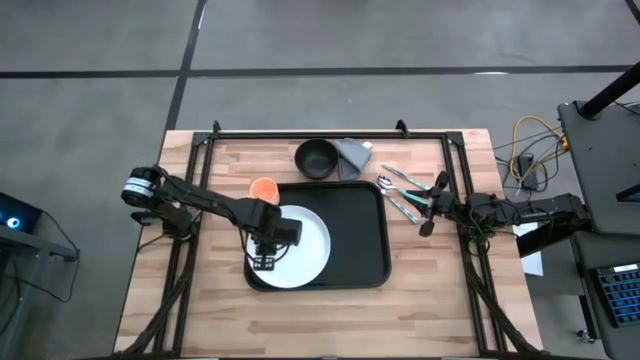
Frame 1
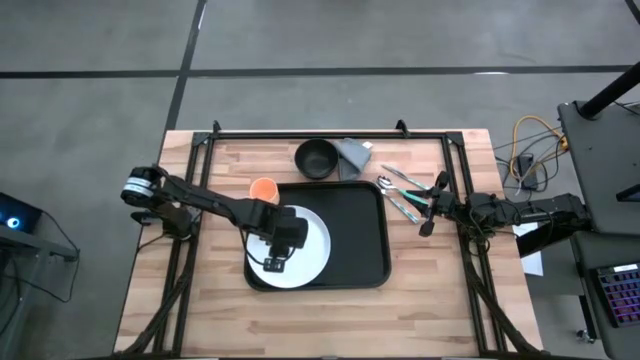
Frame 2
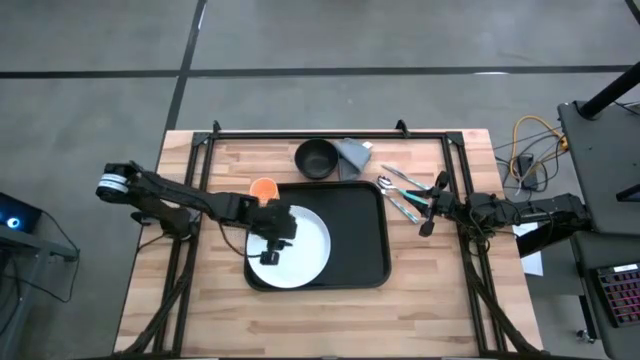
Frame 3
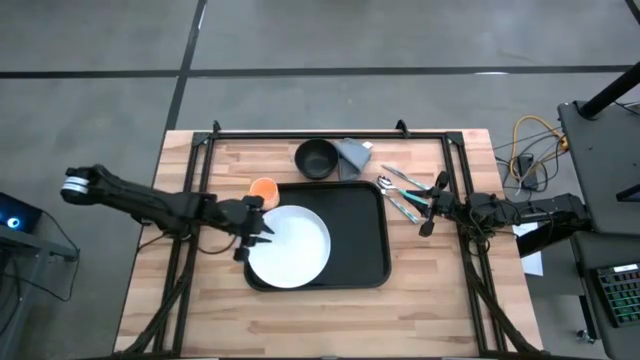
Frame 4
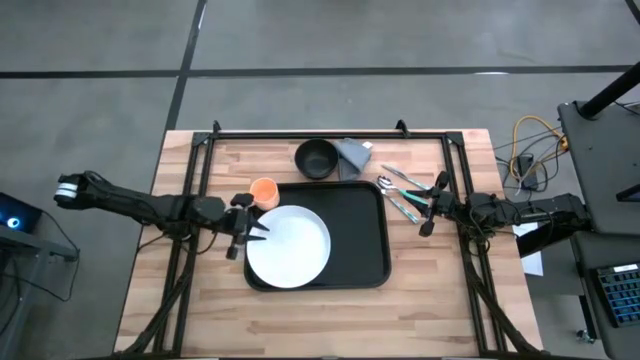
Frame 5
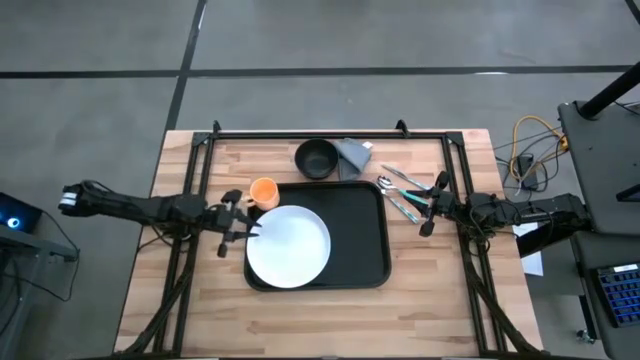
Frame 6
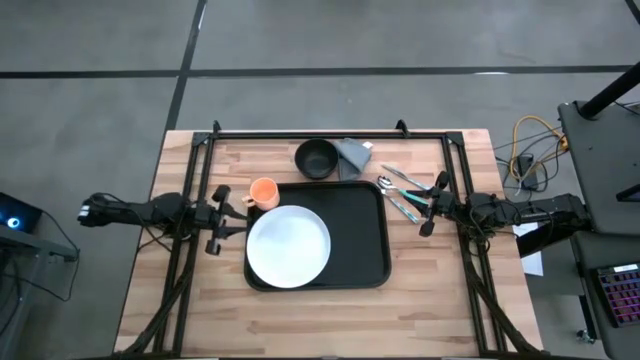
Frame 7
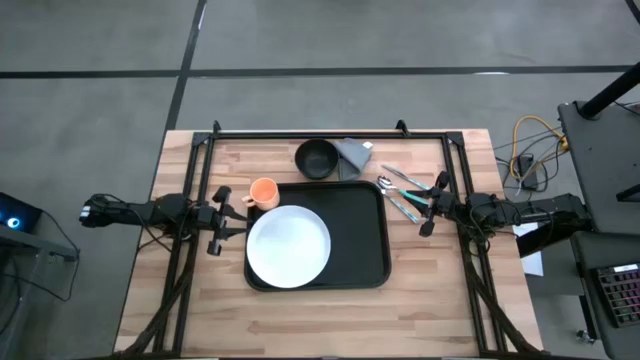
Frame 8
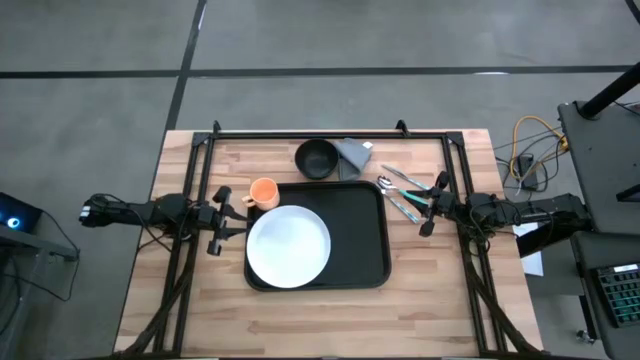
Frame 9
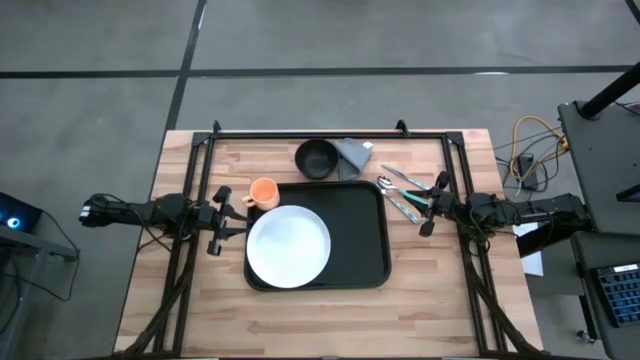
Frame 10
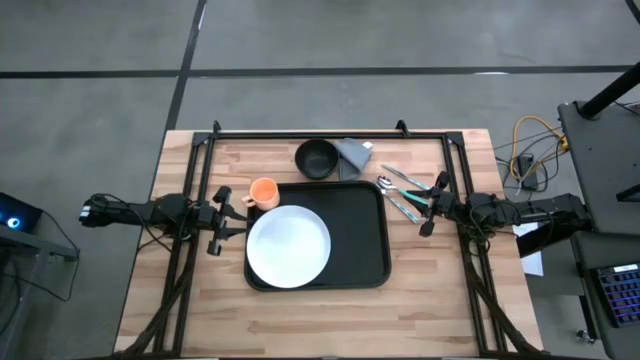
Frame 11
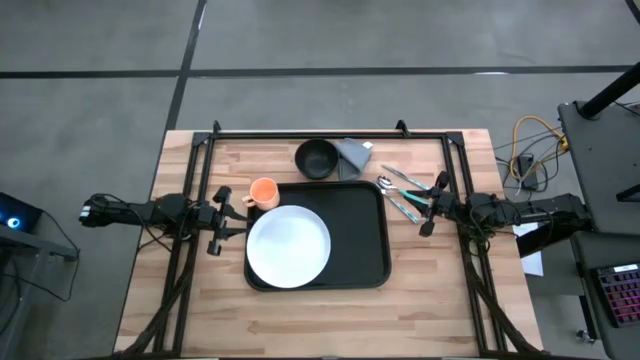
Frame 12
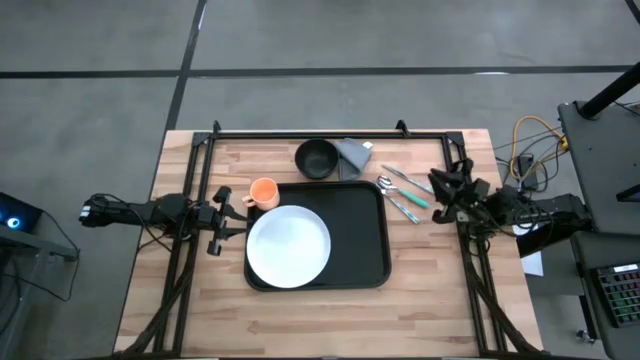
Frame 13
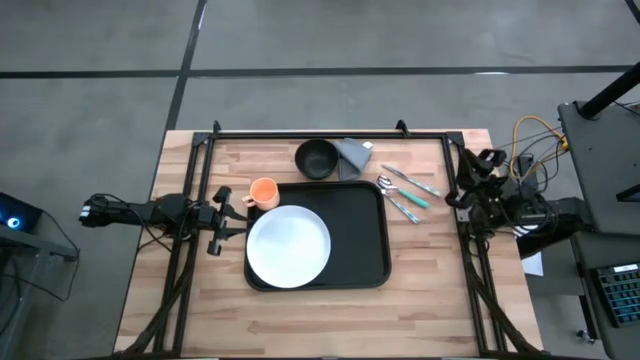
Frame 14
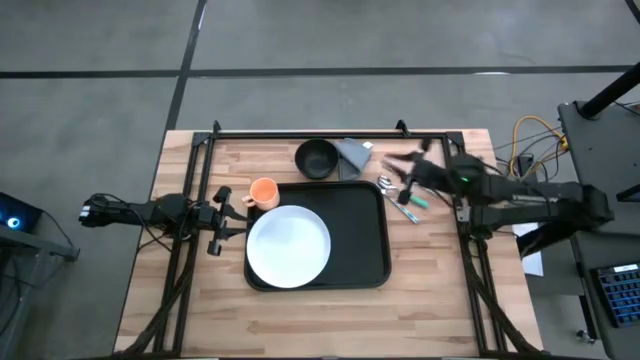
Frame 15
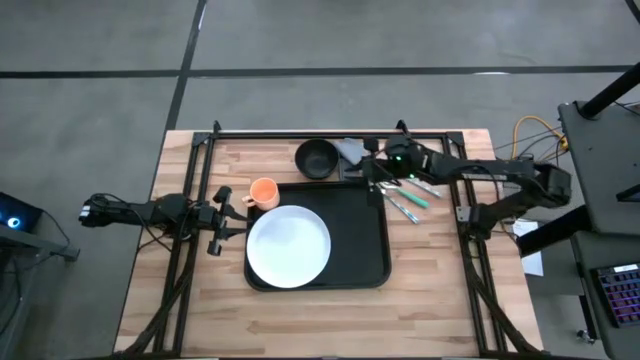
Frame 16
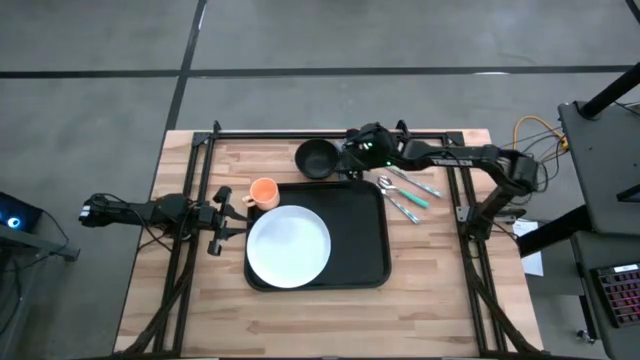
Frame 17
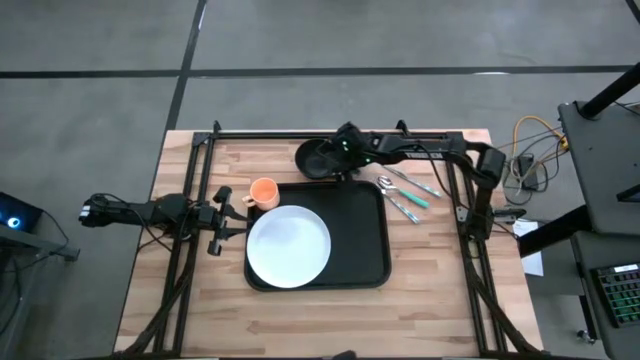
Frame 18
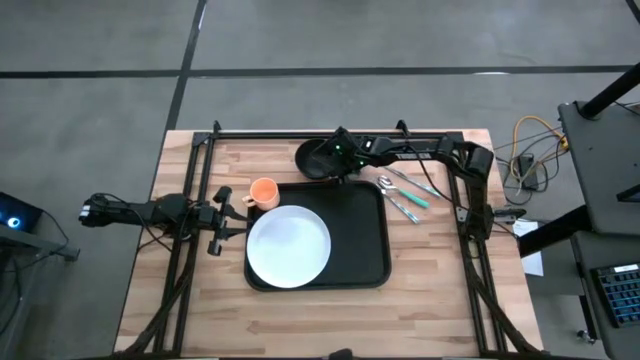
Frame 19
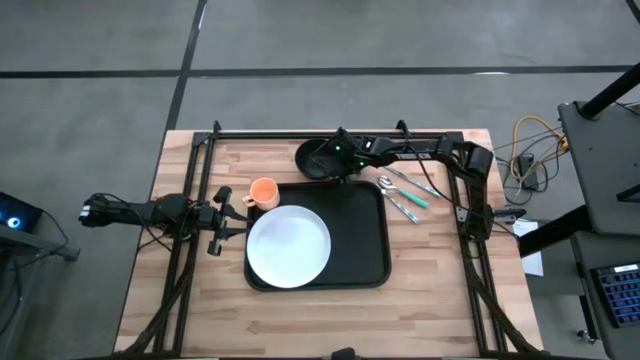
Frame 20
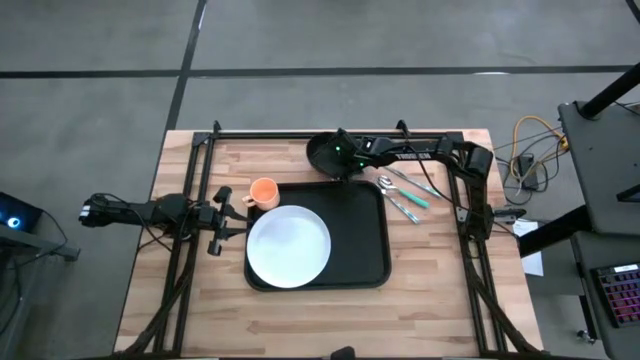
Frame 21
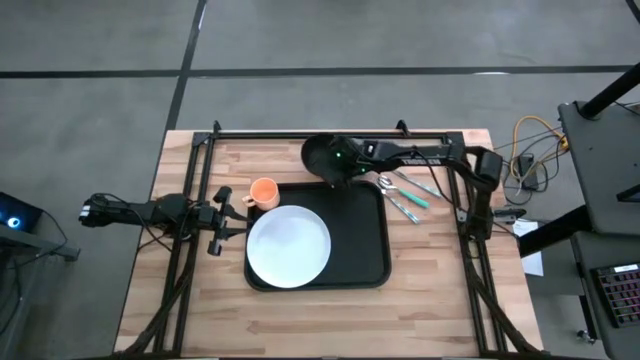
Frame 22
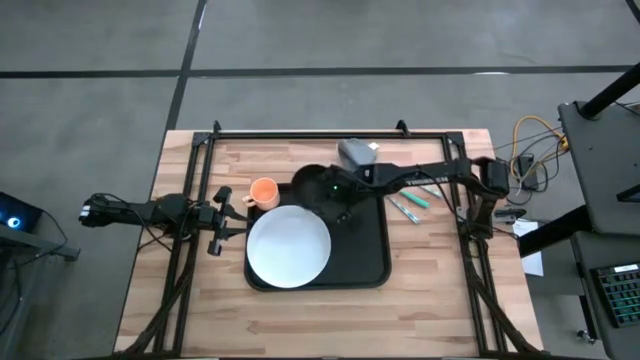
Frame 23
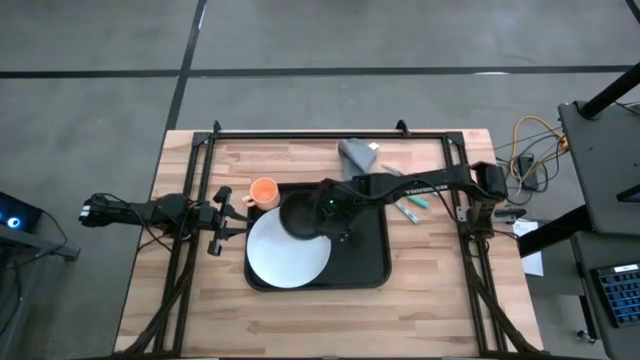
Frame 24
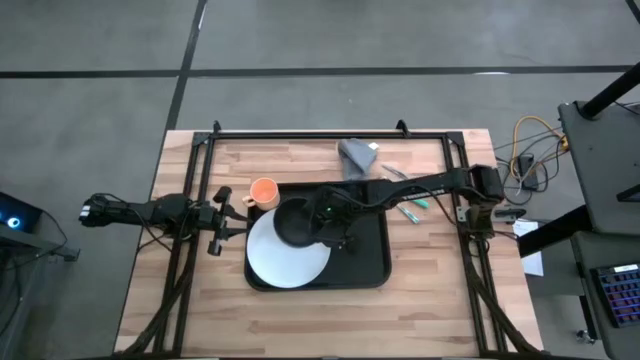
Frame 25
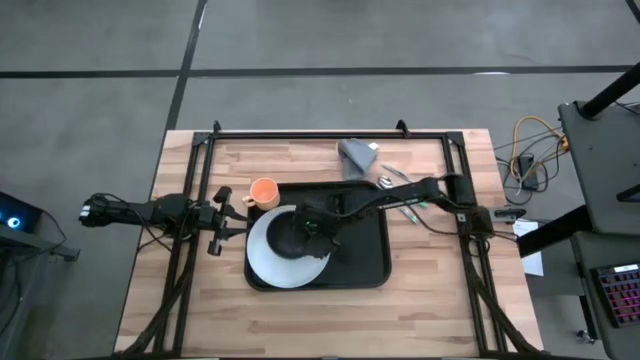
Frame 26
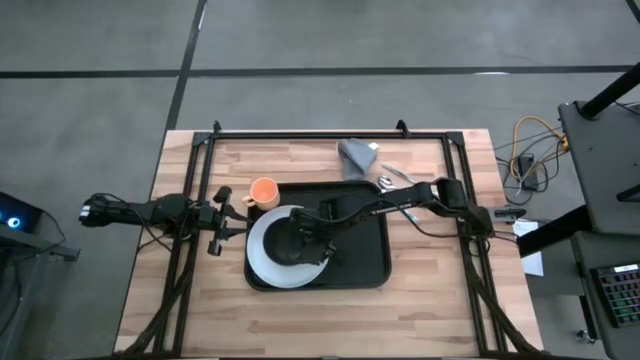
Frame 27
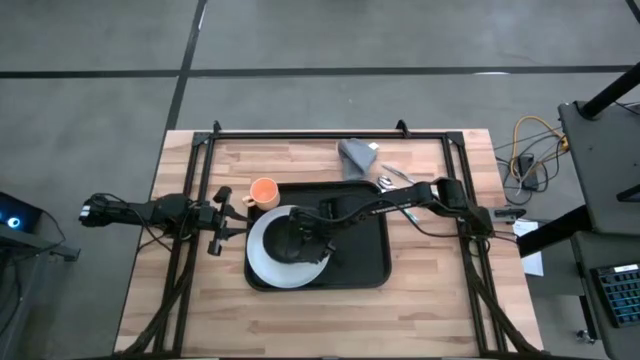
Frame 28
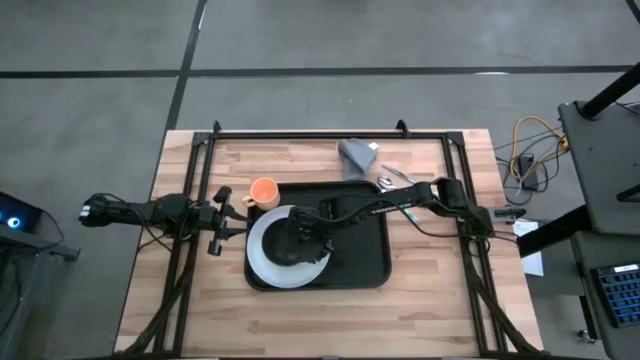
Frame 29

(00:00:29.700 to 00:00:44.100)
Task: Set up tray
Put the black bowl on top of the white plate

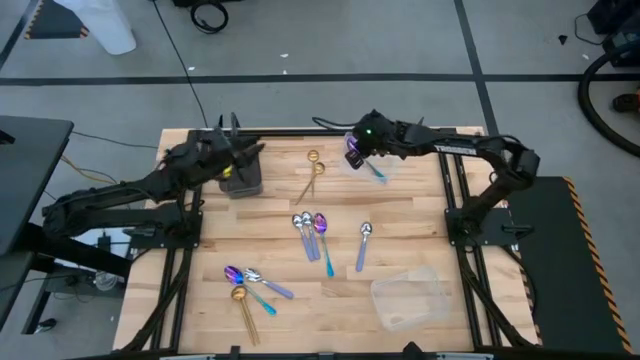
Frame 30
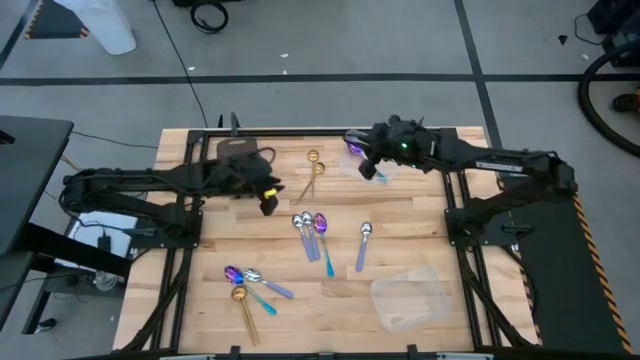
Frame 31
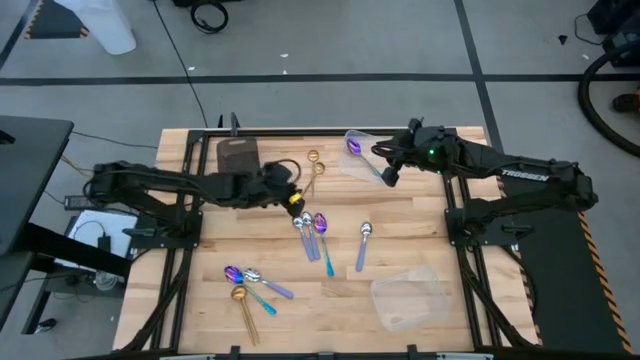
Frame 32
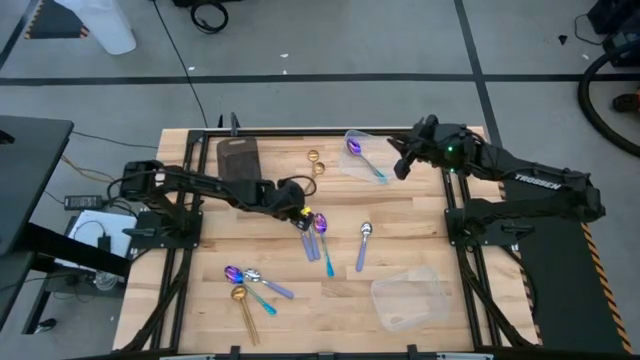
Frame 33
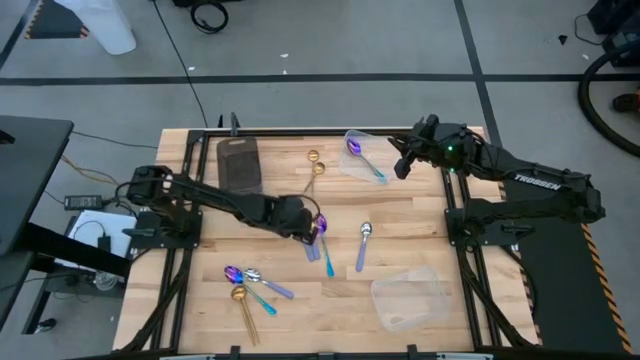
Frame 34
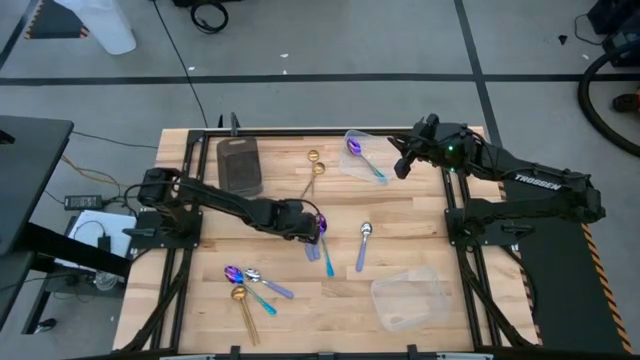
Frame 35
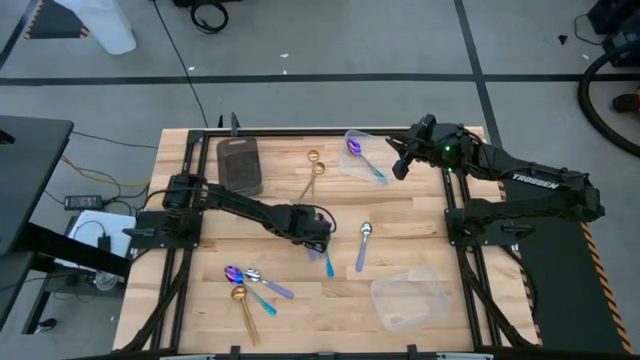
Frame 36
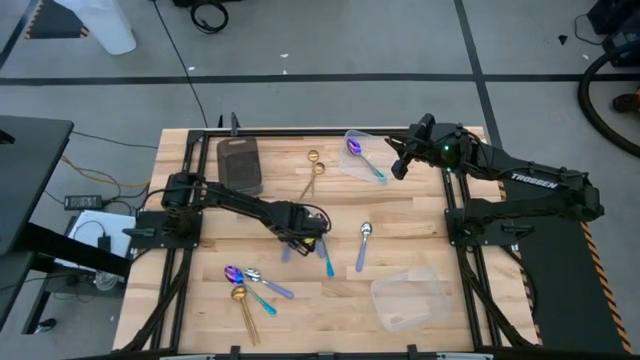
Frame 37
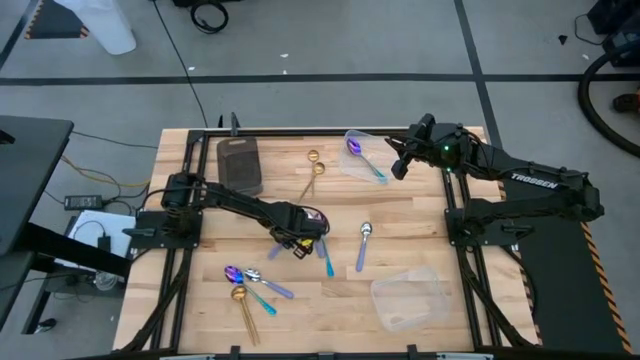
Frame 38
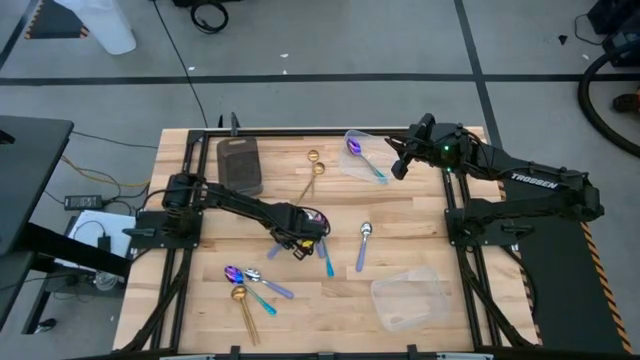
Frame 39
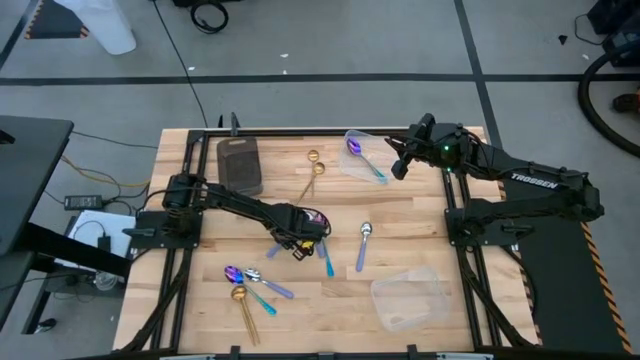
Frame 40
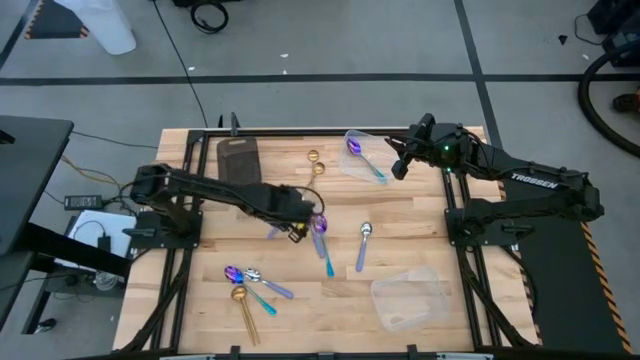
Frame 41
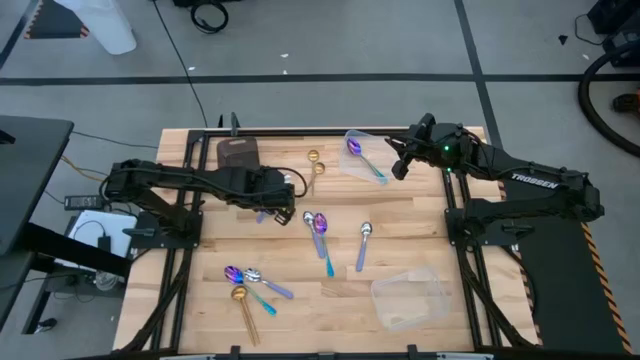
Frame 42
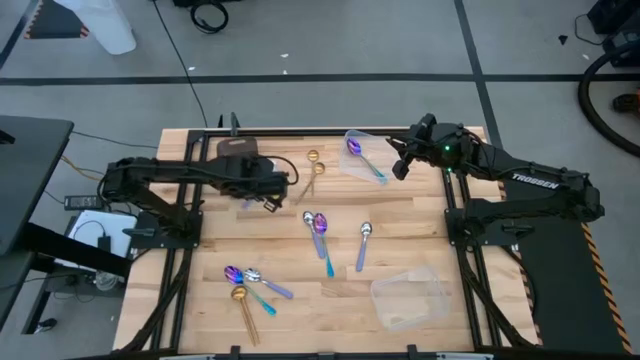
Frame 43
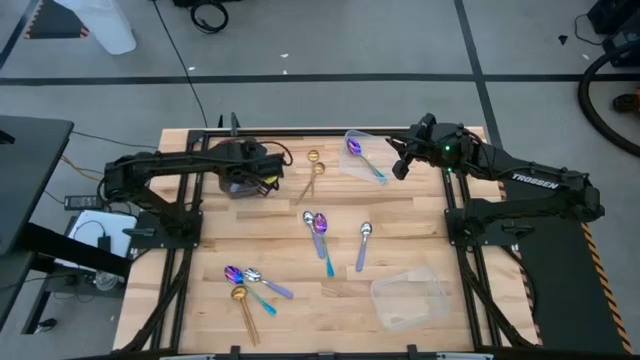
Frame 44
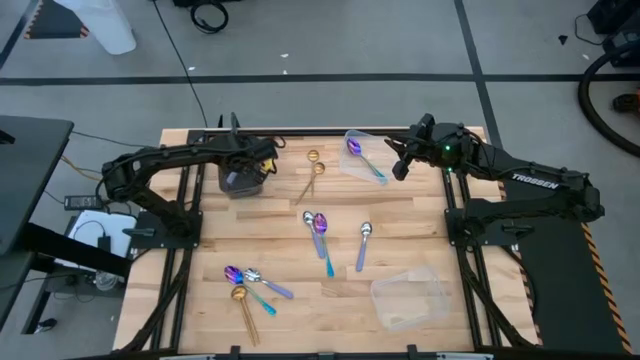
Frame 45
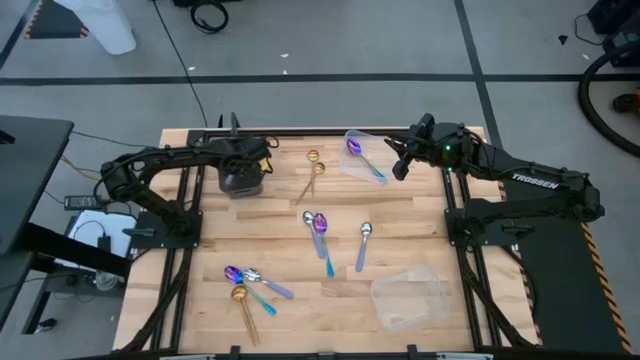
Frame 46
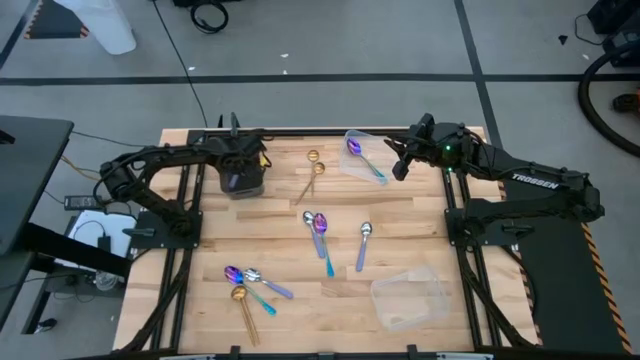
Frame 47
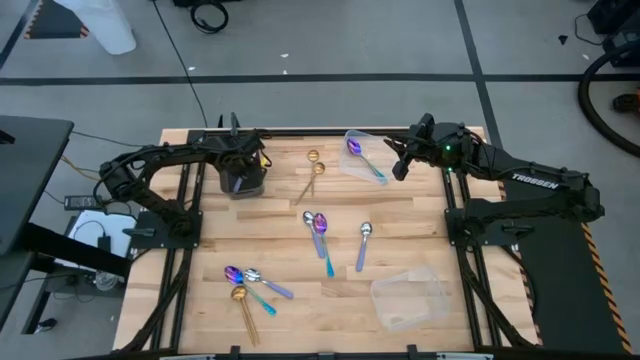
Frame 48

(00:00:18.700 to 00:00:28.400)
Task: Sort silverware by color (type)
Put the purple spoon into the black bin
